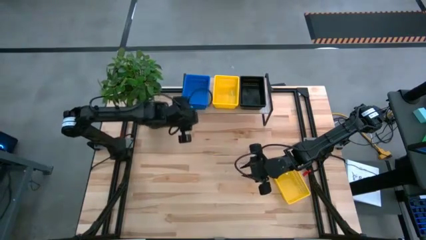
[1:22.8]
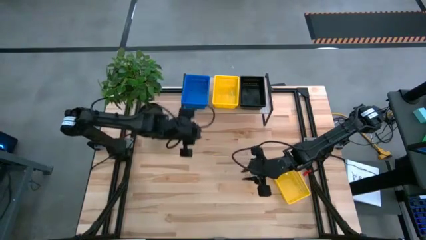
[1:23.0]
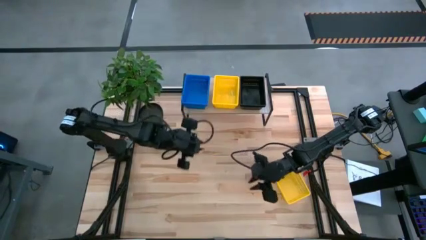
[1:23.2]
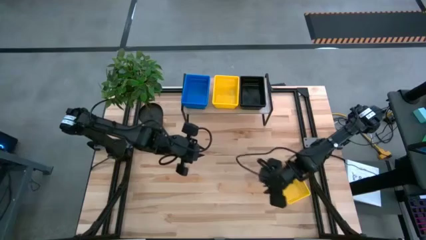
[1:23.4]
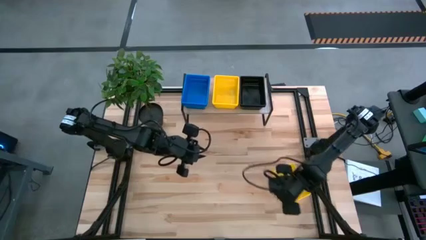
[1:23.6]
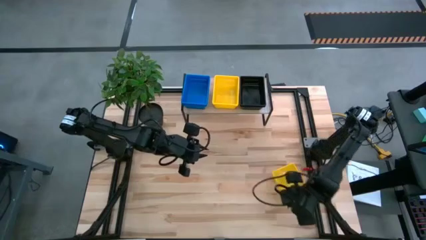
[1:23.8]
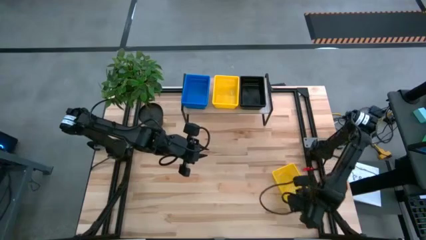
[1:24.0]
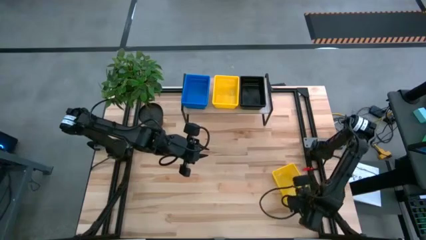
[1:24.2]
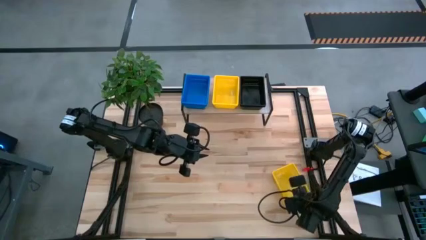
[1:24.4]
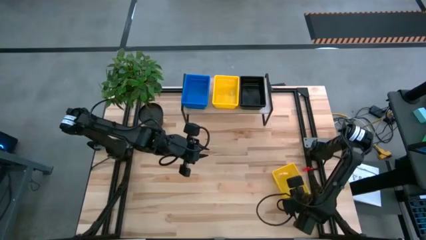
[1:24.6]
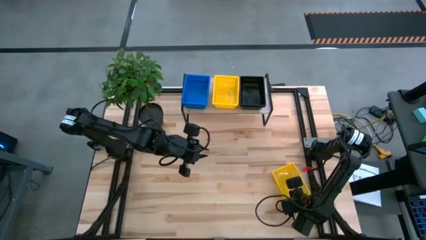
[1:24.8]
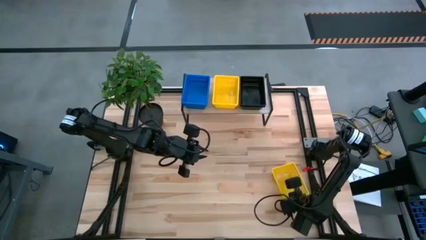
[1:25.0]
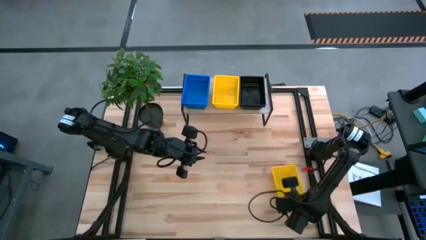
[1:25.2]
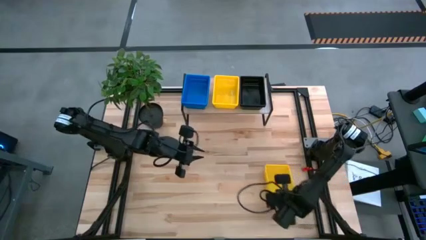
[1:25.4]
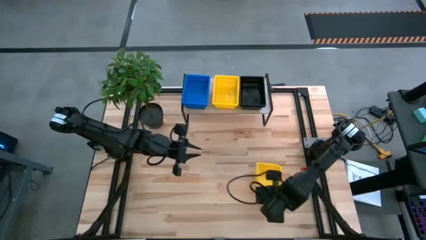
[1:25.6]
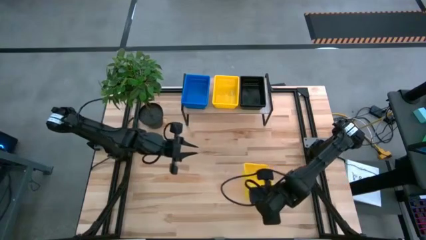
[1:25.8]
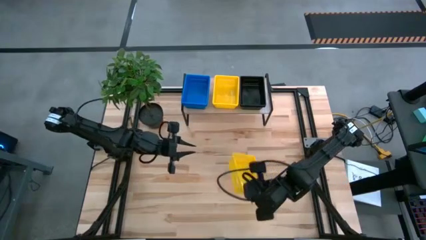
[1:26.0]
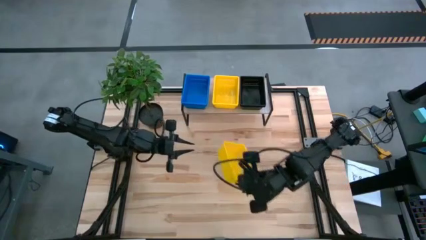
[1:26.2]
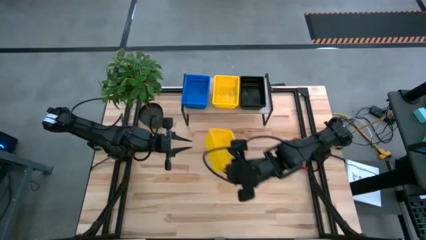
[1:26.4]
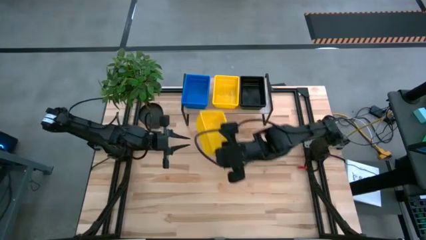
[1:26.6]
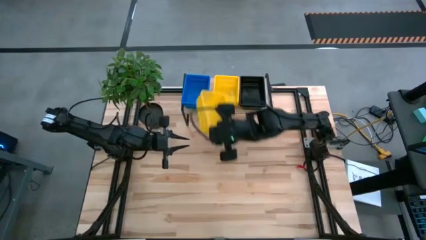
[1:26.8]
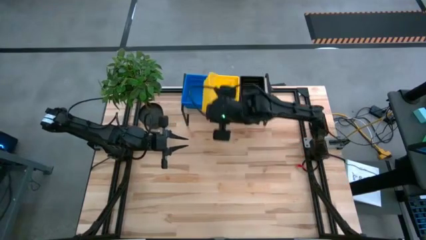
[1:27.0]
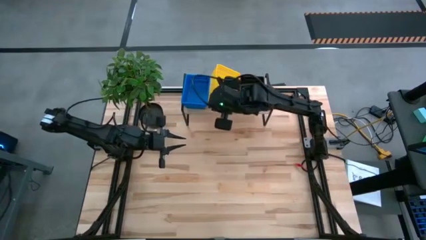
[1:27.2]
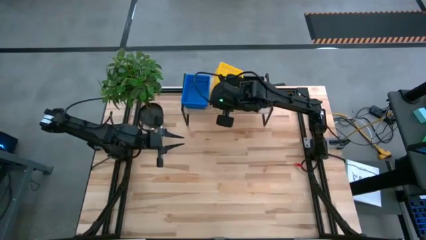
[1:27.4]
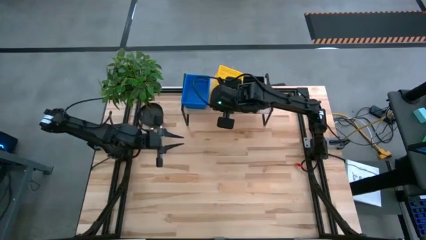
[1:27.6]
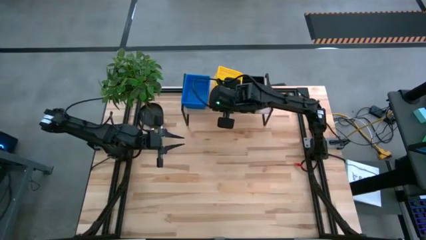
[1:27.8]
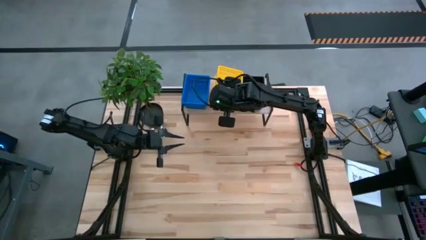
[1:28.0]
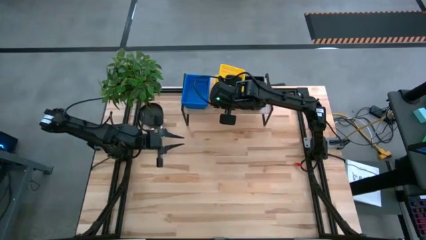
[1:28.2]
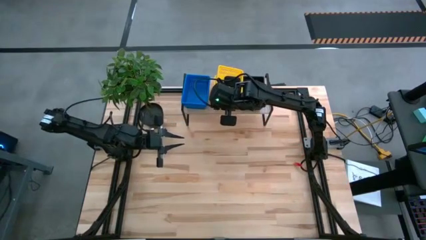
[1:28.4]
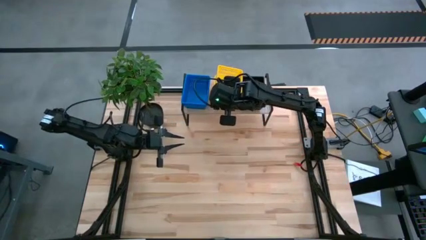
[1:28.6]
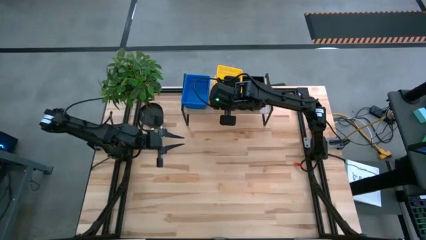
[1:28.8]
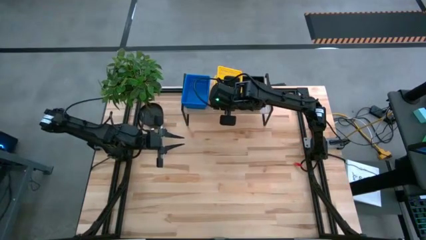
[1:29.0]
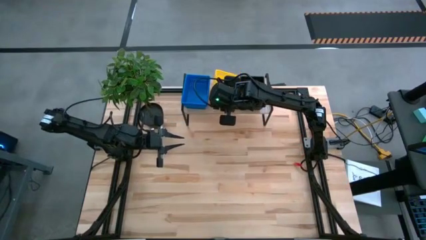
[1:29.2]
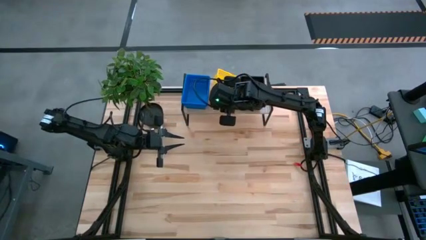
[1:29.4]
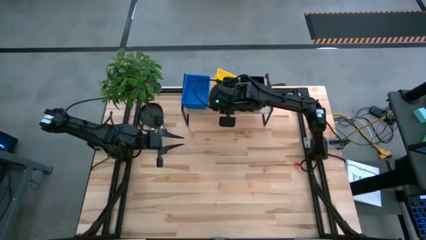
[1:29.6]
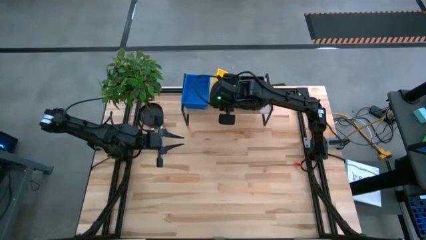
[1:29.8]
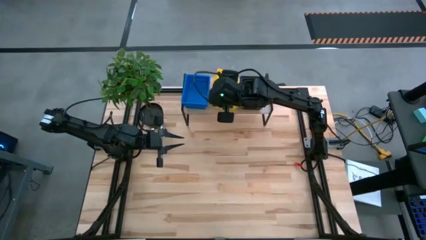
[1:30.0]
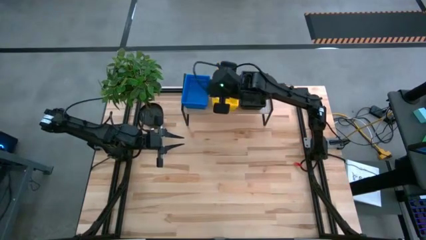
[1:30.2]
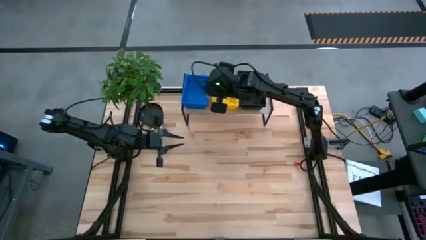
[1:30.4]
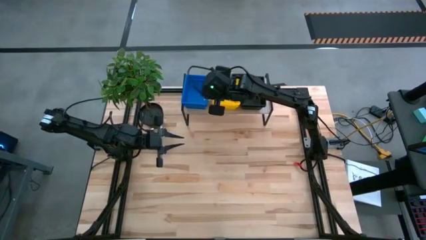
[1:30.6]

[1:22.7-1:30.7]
Task: Stack baskets on shelf by color
Stack the yellow bin on top of the other yellow bin on the shelf

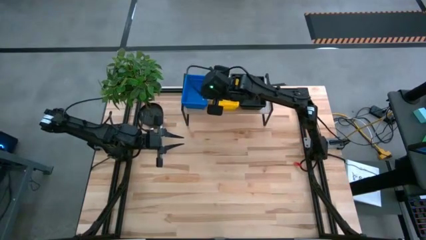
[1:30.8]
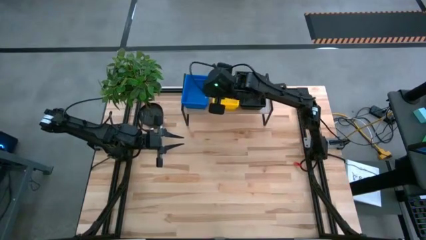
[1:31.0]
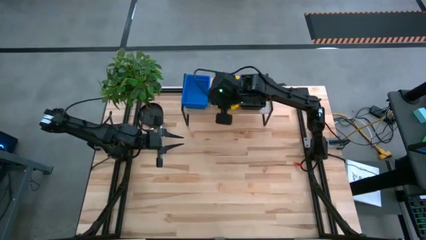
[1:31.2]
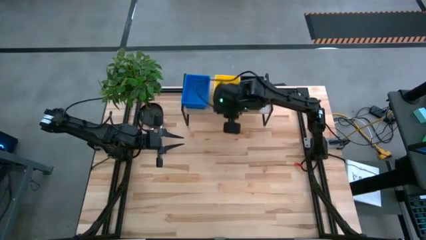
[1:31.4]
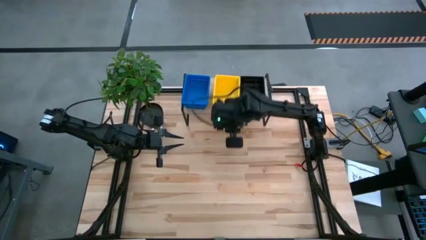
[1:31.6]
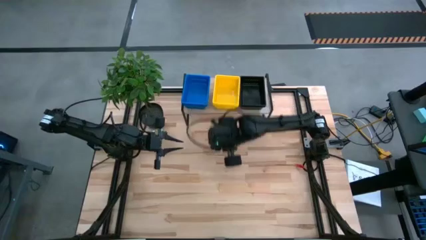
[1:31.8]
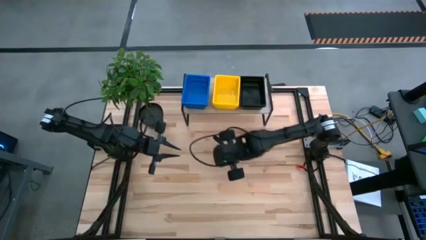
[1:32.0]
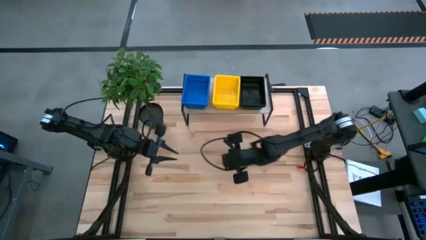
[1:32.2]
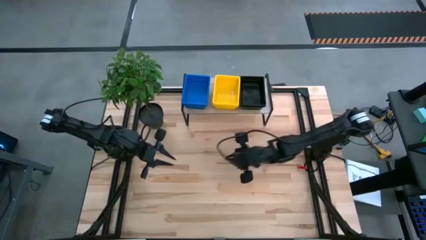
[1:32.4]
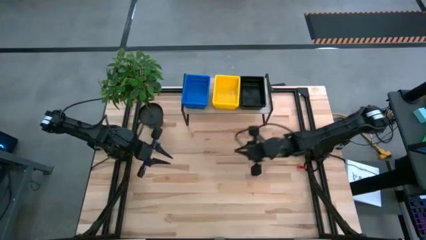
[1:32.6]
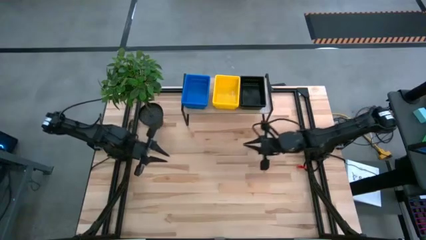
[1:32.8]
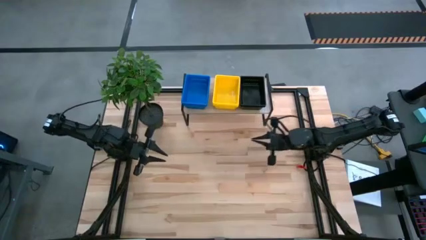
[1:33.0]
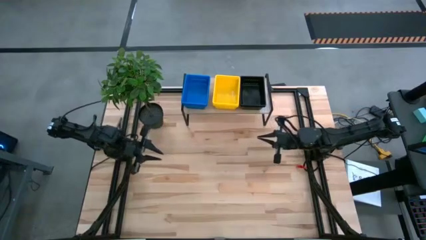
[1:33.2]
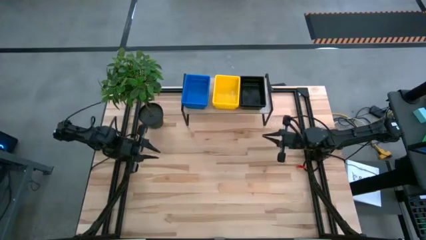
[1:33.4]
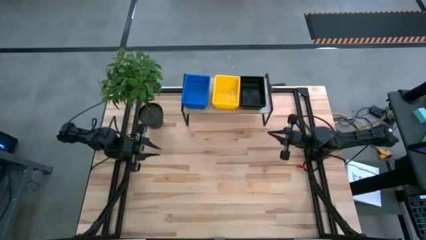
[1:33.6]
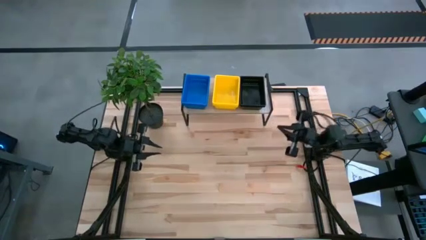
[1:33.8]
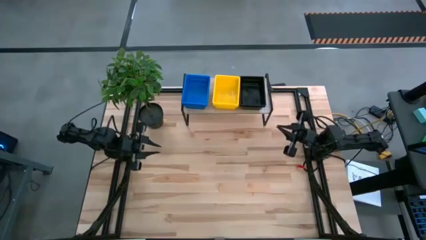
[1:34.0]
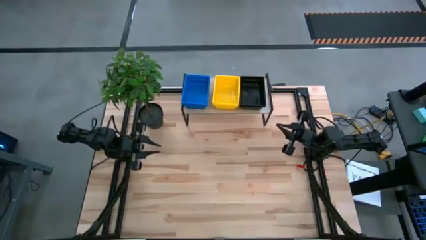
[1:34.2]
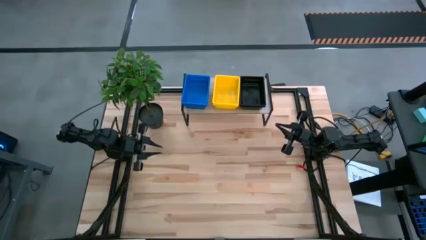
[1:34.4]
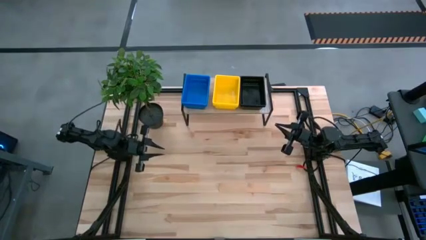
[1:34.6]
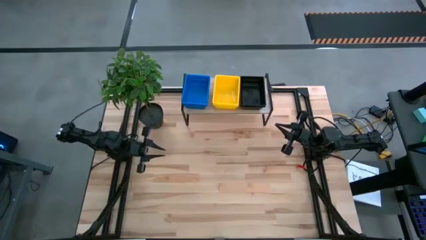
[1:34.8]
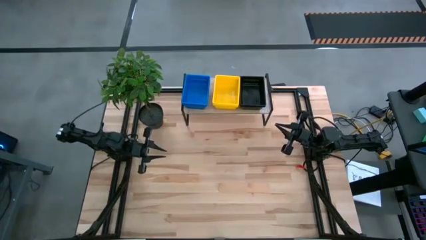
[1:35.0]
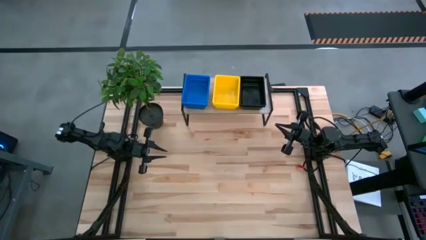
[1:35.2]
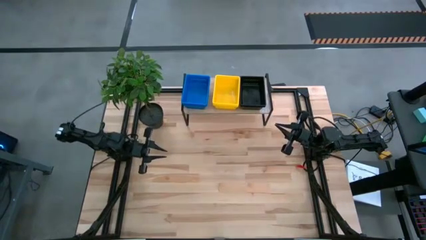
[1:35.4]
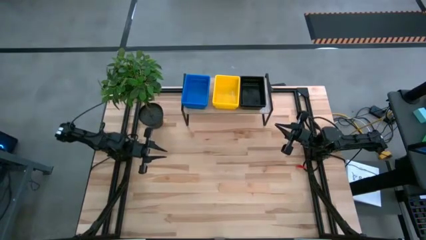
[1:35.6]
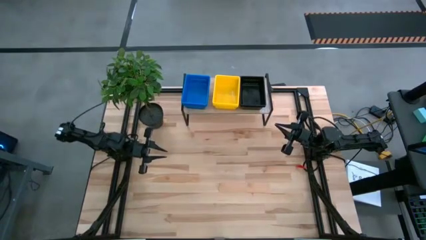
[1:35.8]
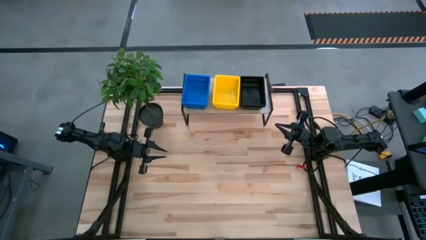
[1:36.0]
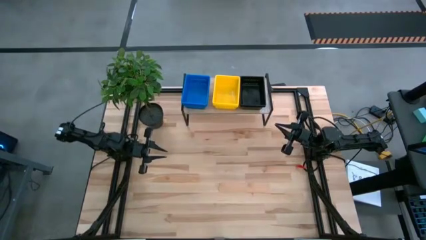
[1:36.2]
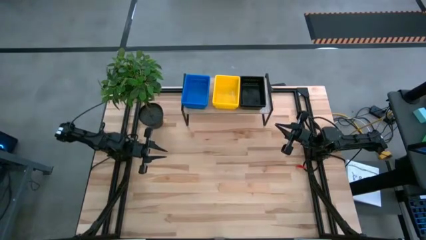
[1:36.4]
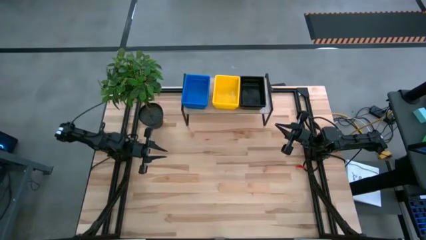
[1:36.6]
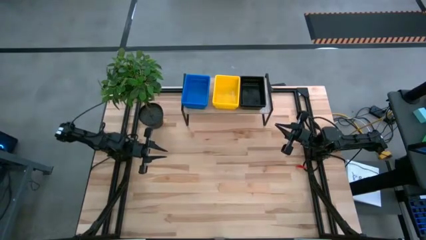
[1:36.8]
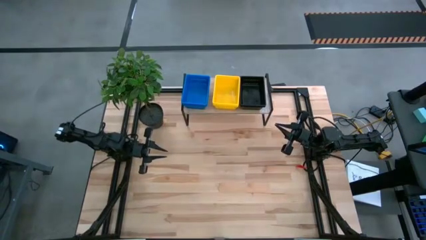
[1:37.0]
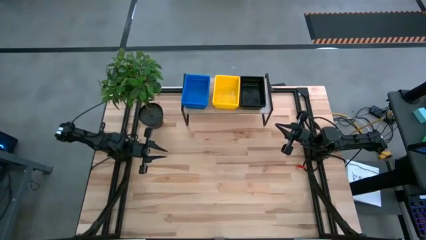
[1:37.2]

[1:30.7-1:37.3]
Return to Home Position
